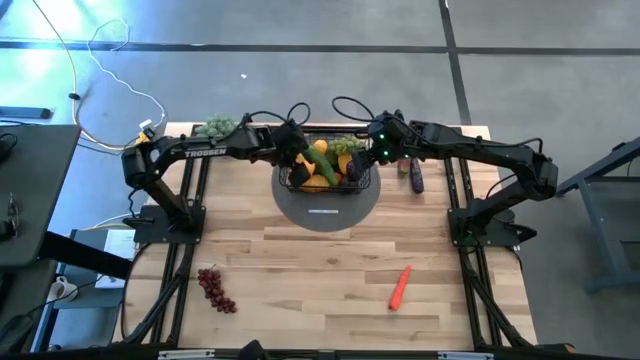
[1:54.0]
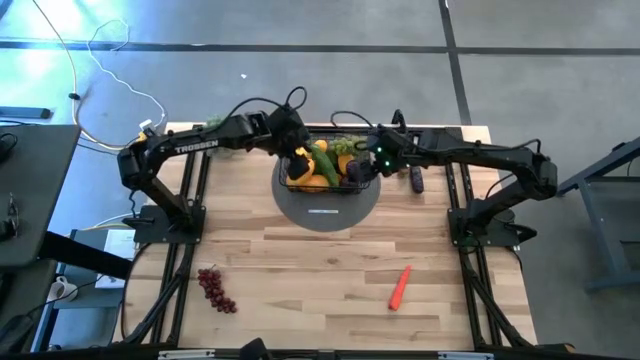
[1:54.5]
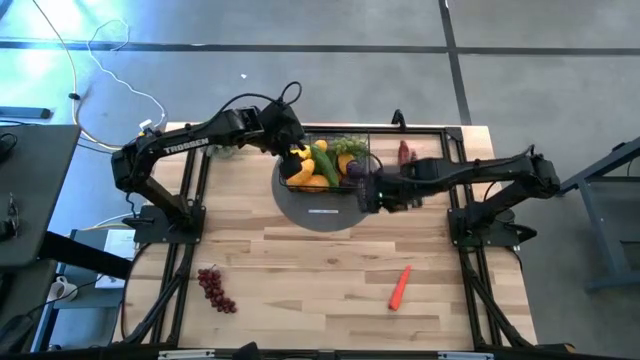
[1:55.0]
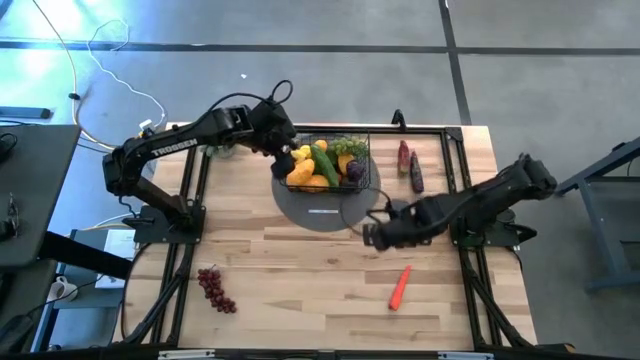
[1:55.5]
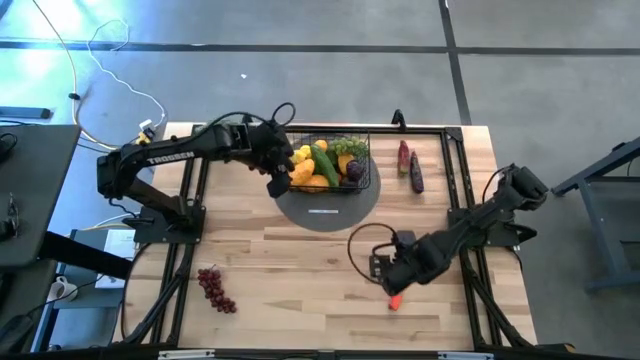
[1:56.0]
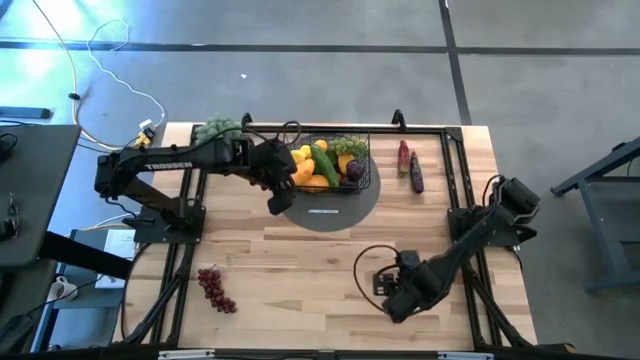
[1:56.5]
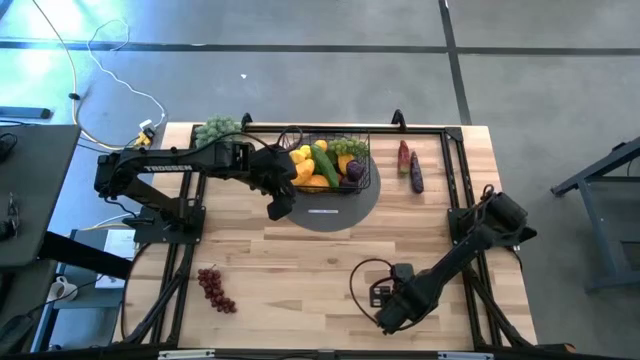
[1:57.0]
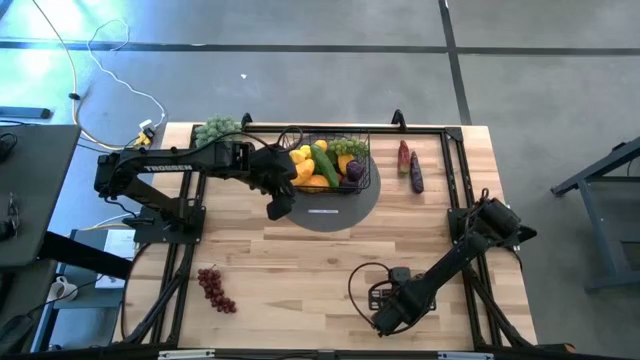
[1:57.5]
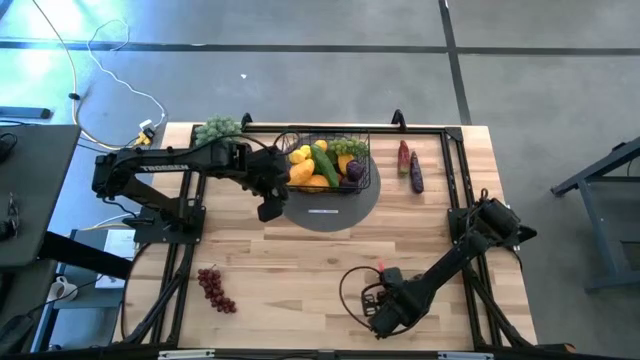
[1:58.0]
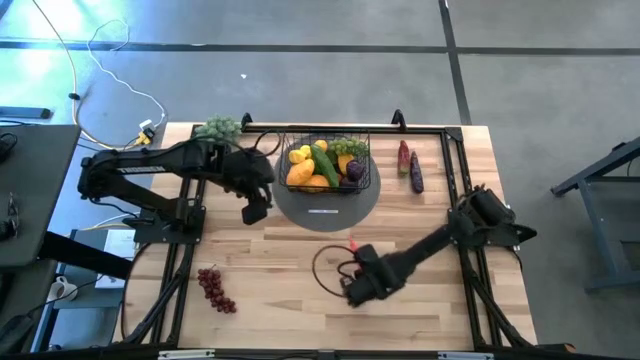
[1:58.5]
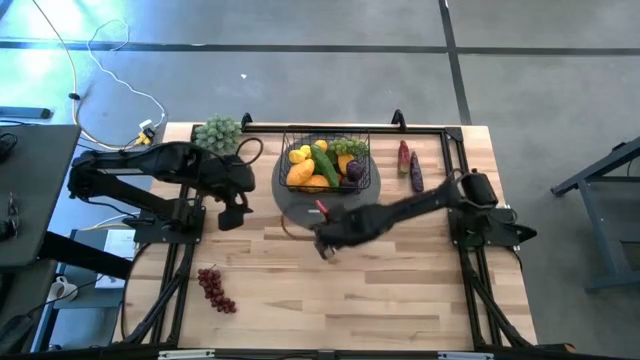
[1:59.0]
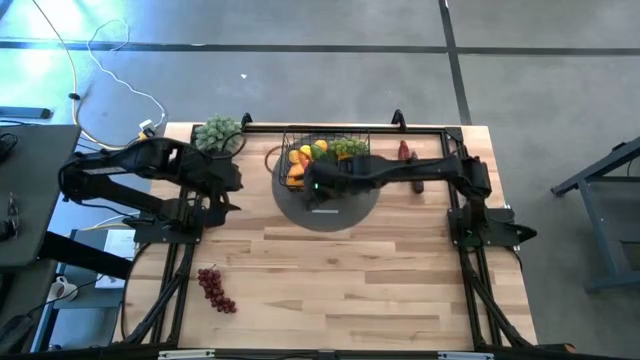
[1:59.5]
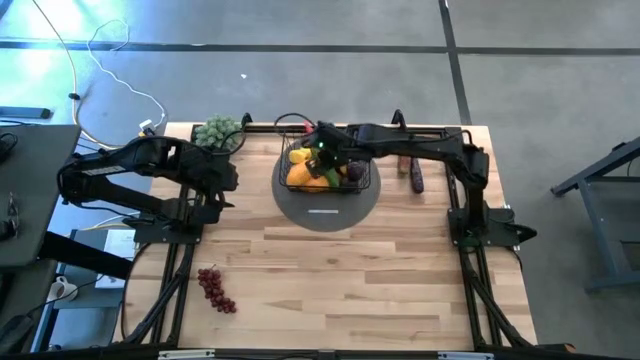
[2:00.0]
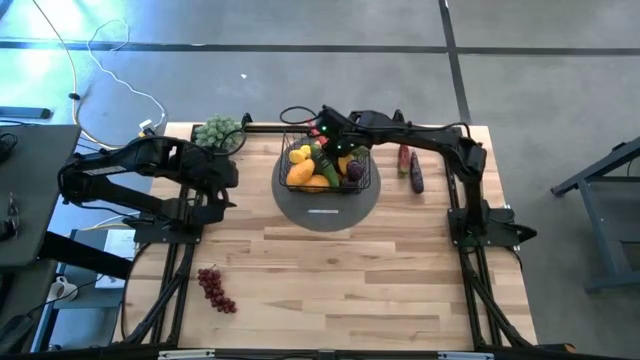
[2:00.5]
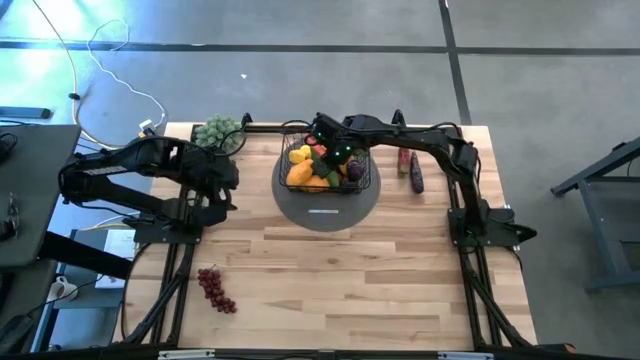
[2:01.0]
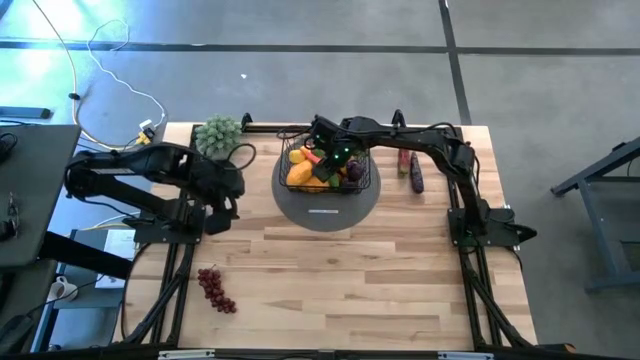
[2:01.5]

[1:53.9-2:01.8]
Task: Build produce basket
Put the orange carrot into the wire basket

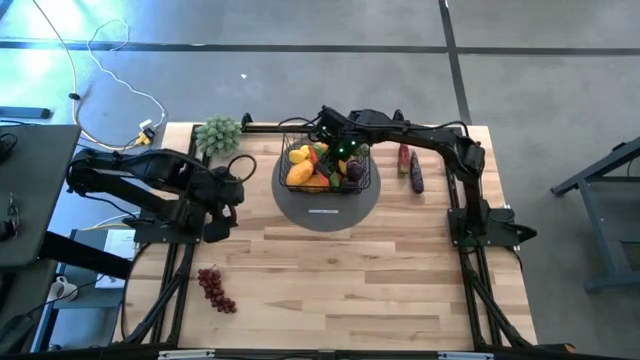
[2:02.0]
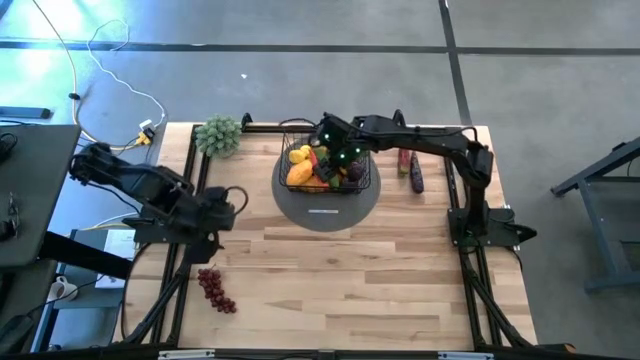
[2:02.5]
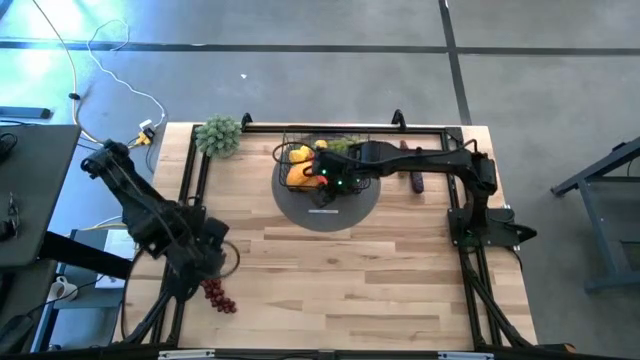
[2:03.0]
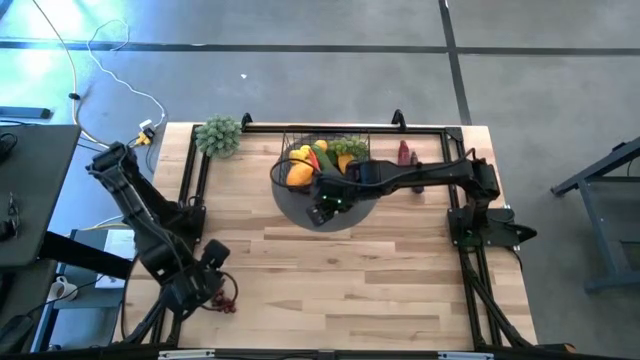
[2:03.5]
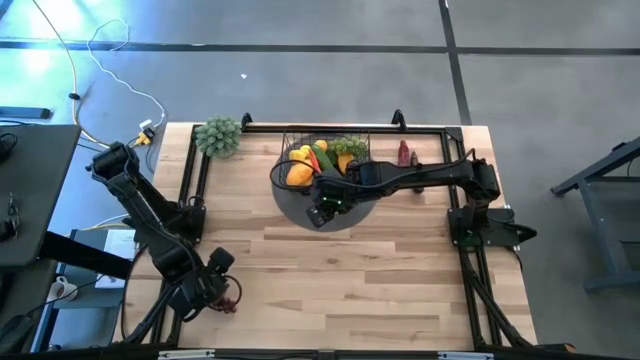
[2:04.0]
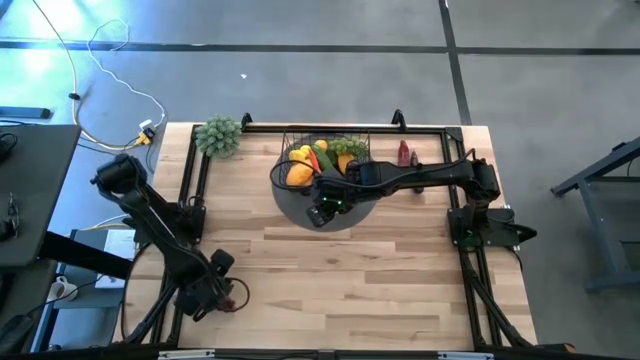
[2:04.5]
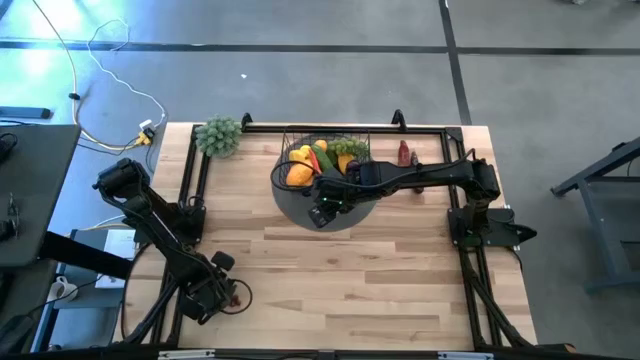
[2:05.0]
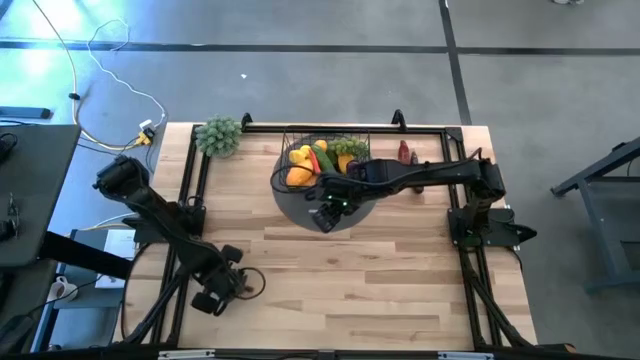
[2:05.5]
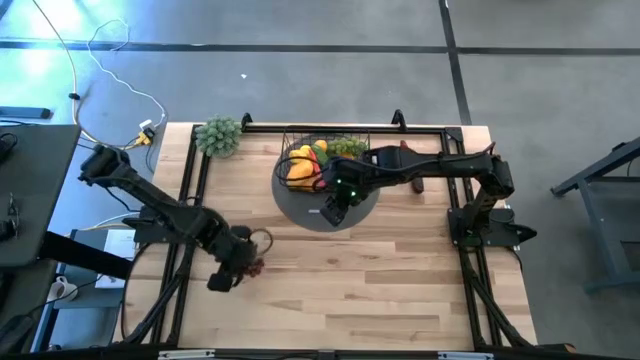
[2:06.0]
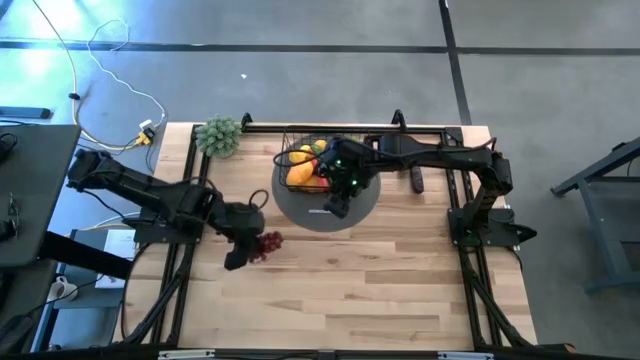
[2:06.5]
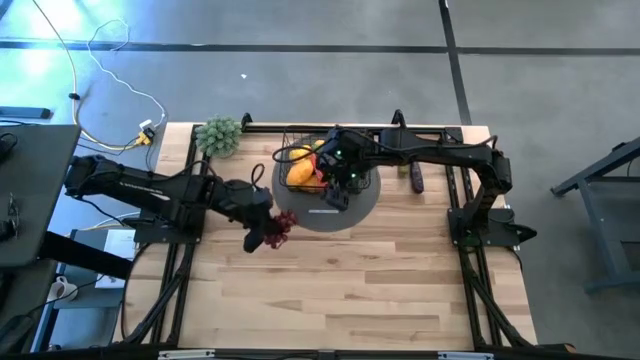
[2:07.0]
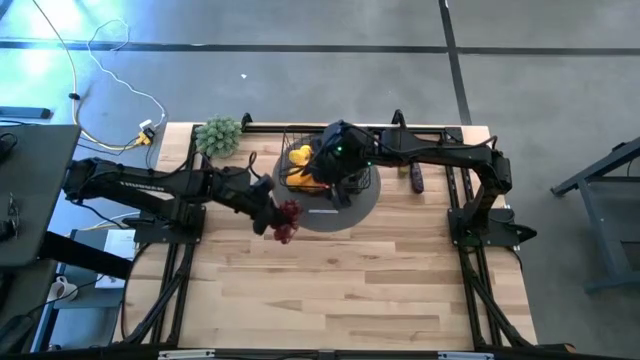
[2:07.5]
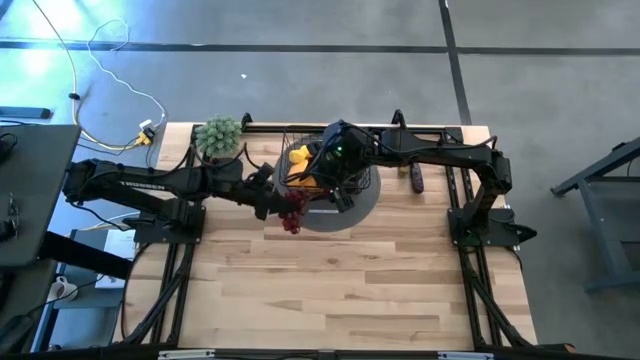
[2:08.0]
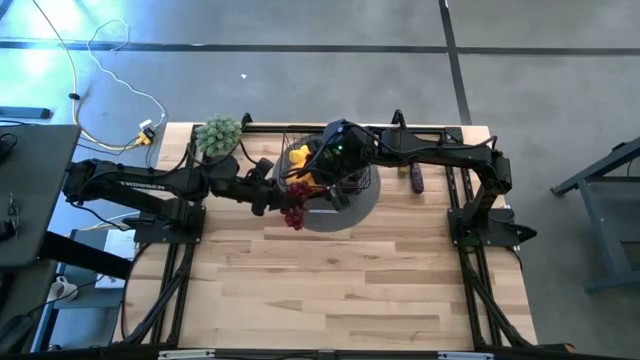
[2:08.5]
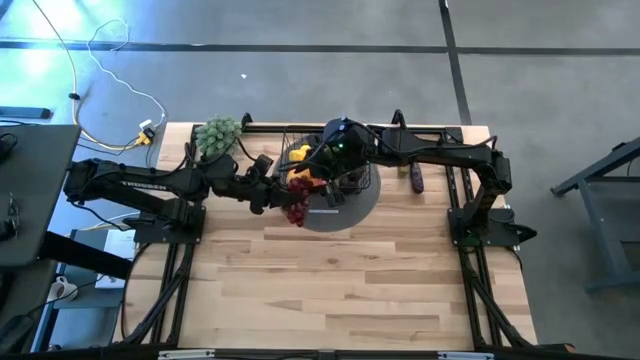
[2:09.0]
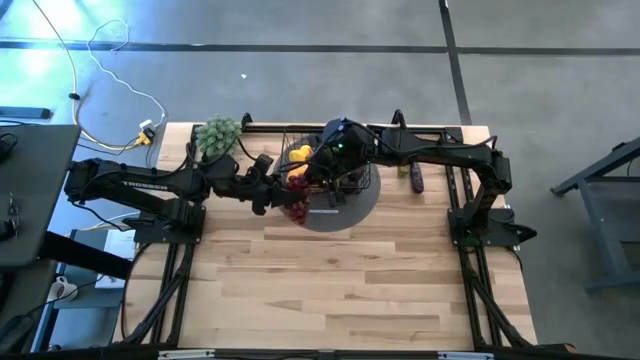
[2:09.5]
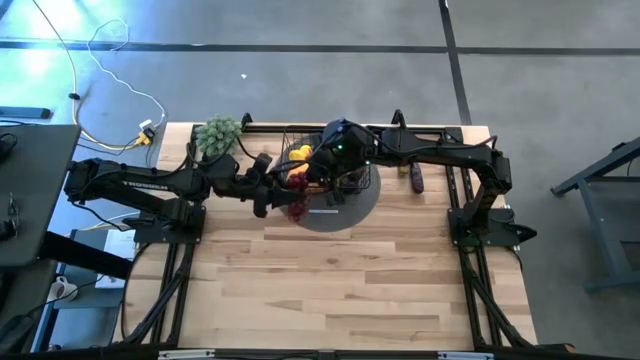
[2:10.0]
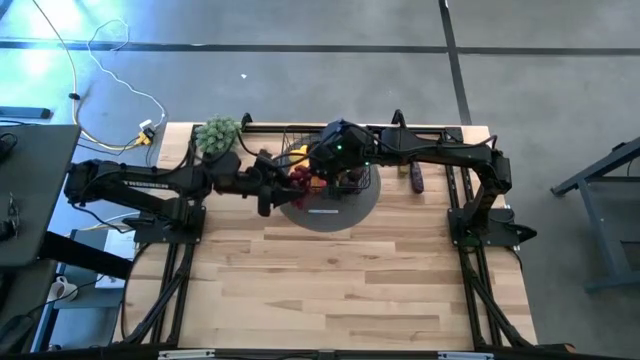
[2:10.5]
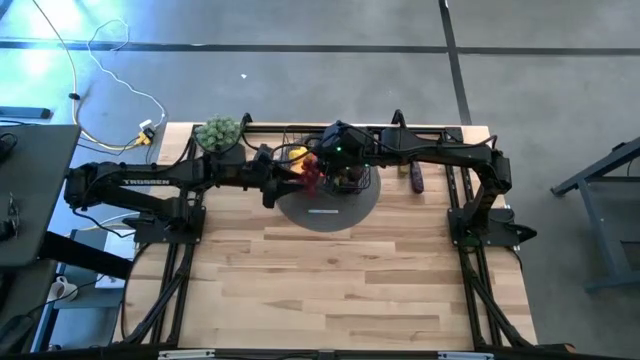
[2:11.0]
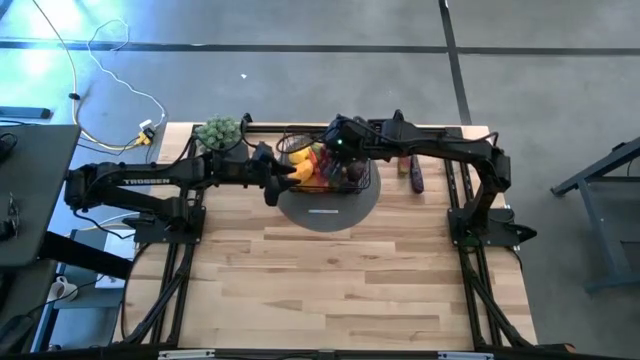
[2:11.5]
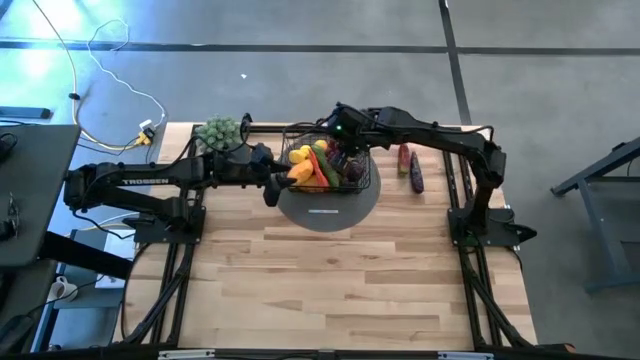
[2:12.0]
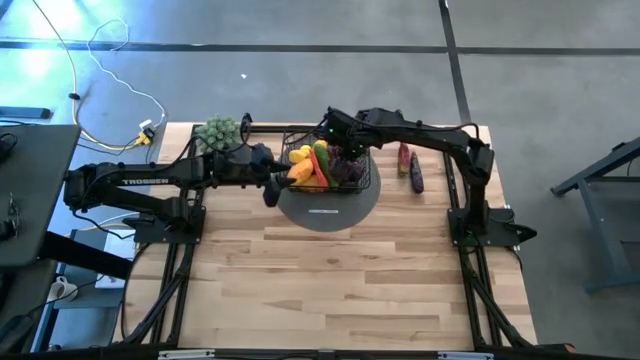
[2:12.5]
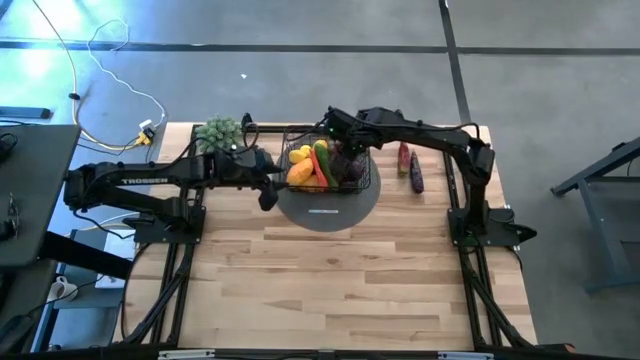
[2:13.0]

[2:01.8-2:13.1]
Put the red grapes into the wire basket
